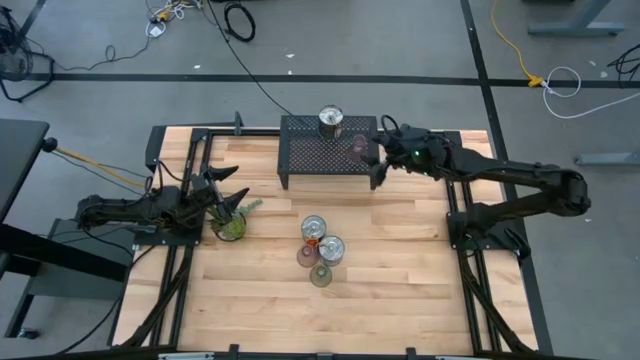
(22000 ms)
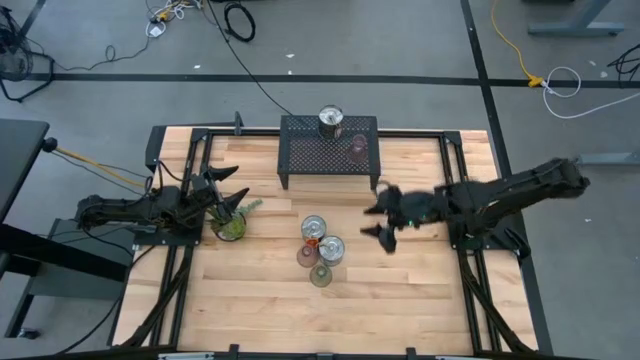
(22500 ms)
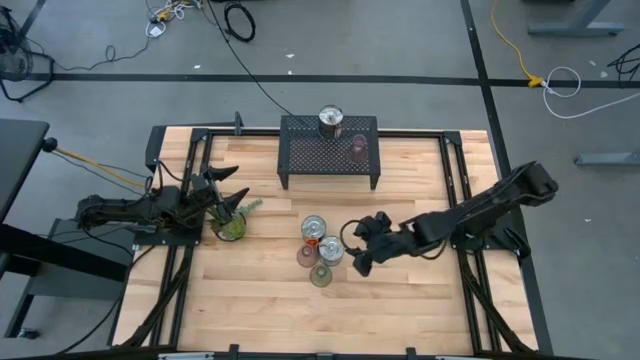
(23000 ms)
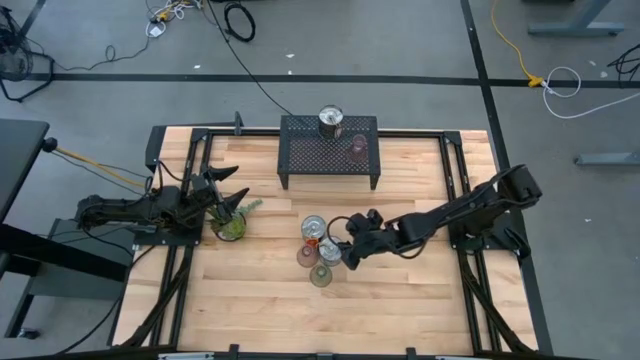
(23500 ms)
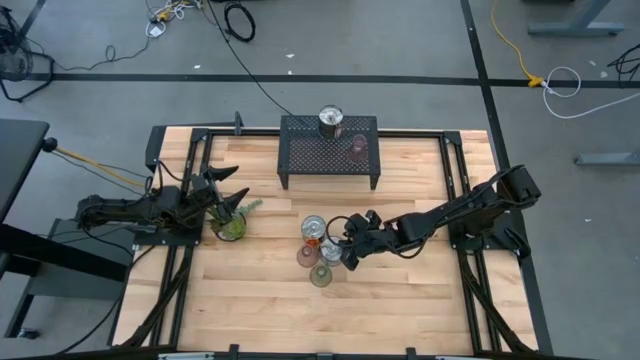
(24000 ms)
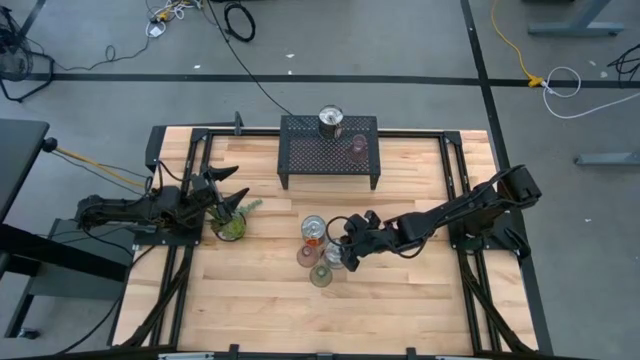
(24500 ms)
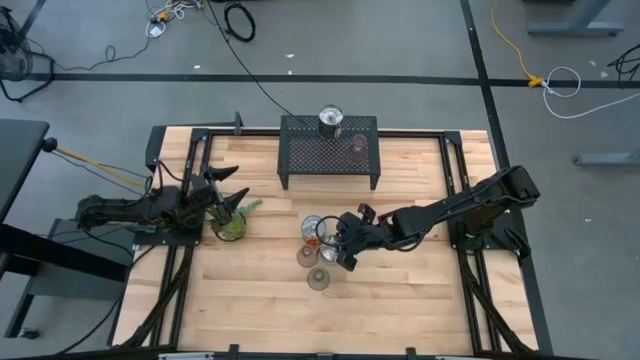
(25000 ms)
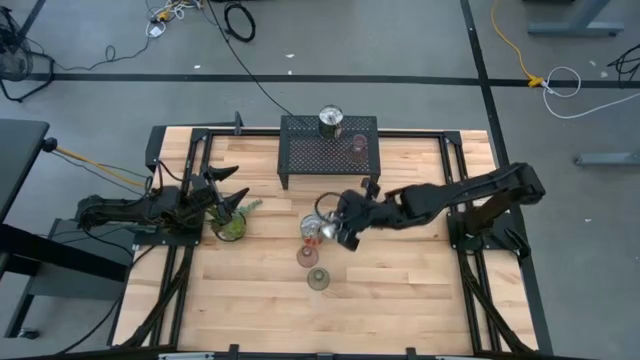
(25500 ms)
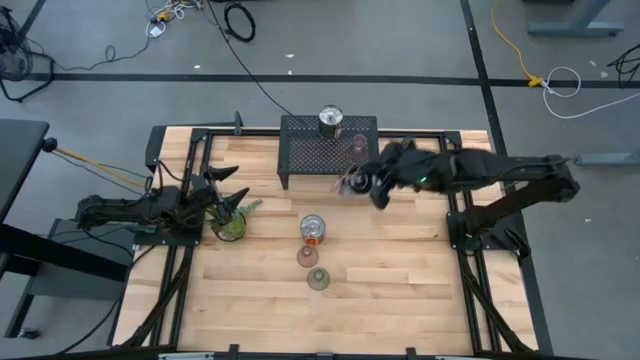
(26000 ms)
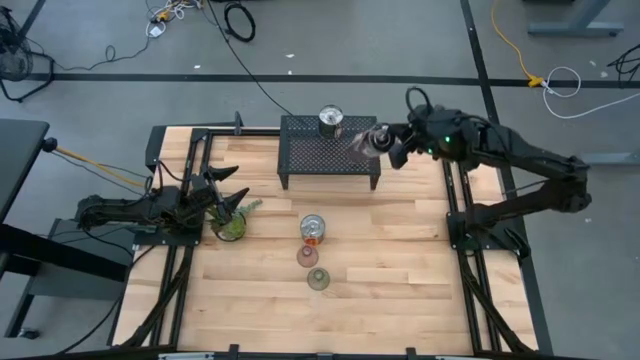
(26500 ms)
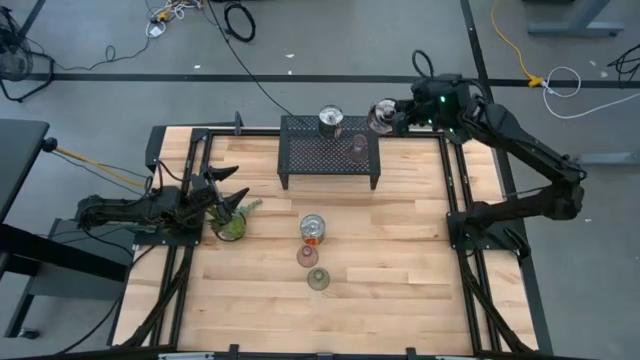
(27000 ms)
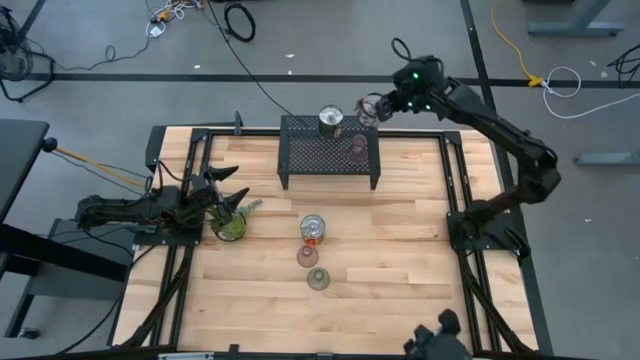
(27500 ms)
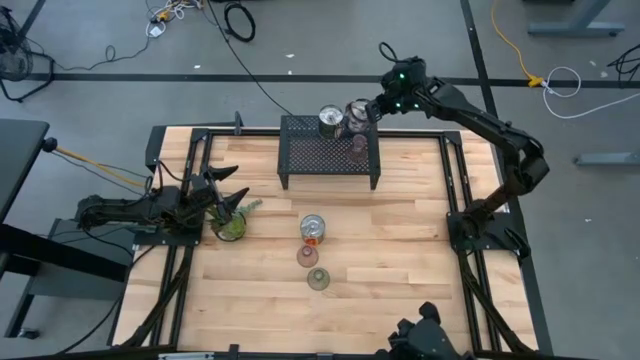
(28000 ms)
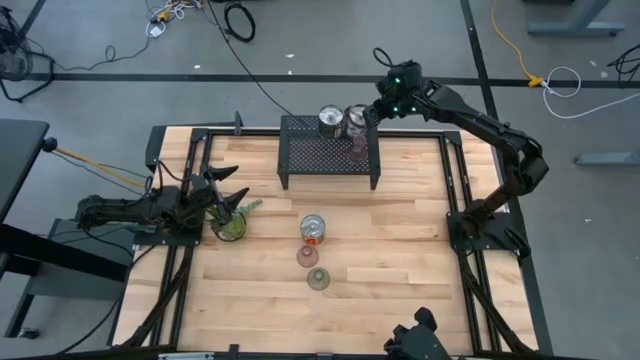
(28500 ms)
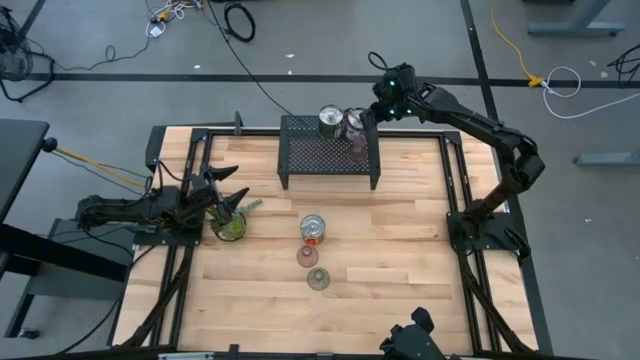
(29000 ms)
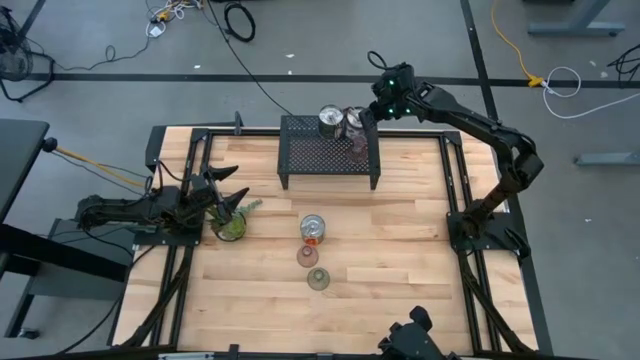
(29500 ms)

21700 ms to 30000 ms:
Task: Pick & Place candle stick holders
Put the bottom silver scented candle on the shelf

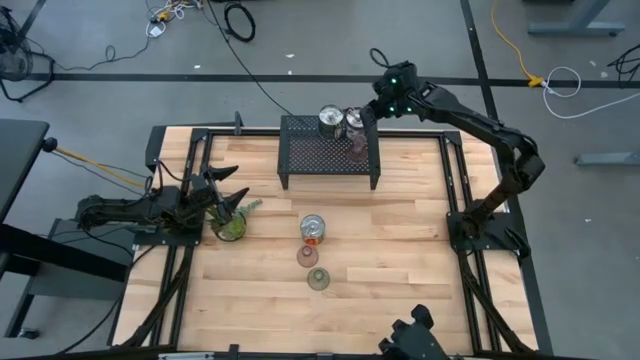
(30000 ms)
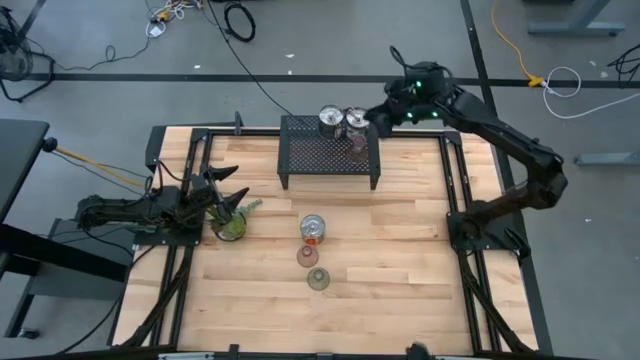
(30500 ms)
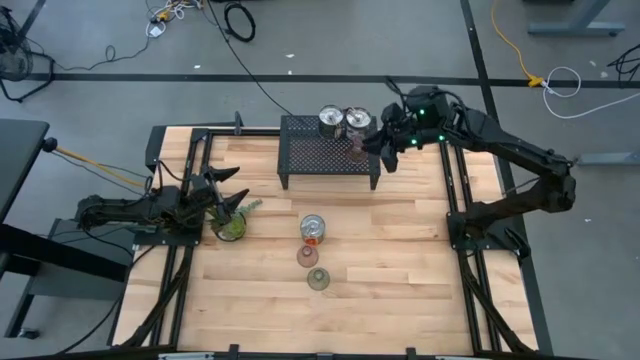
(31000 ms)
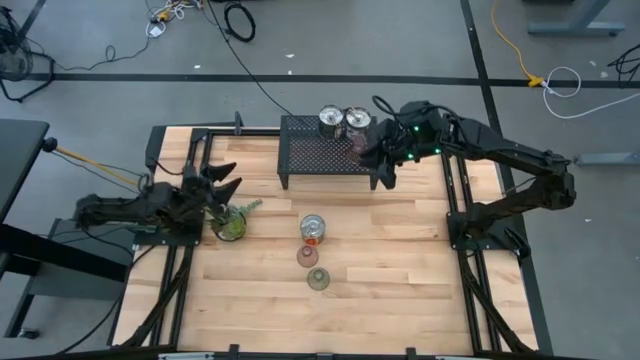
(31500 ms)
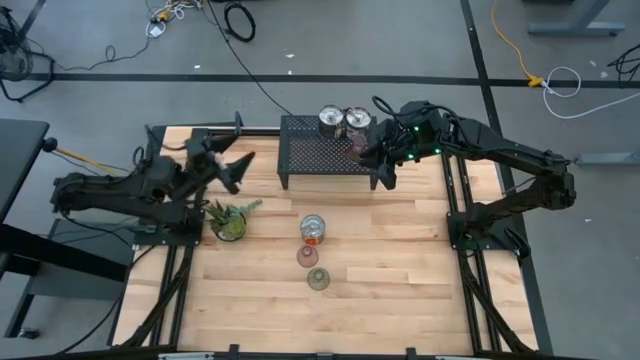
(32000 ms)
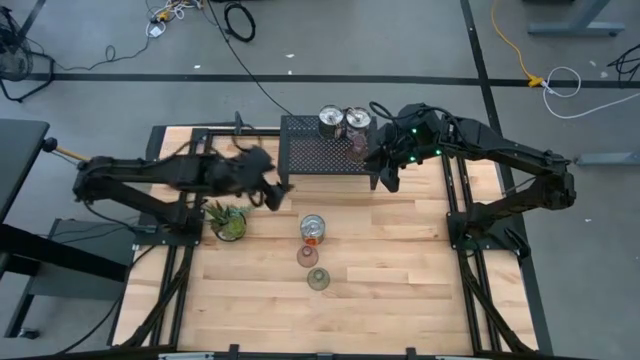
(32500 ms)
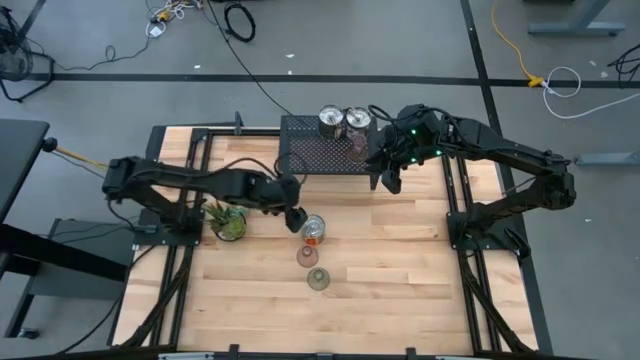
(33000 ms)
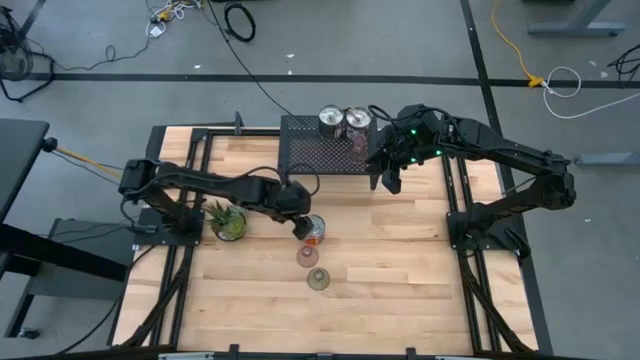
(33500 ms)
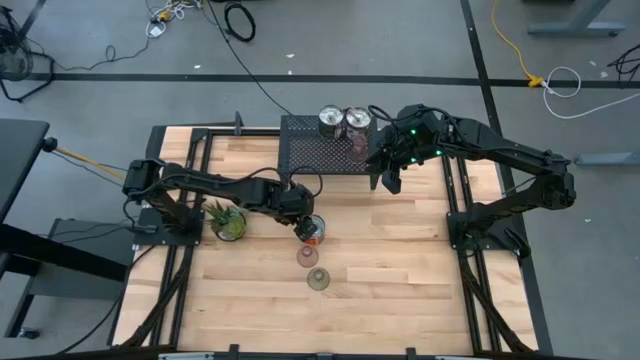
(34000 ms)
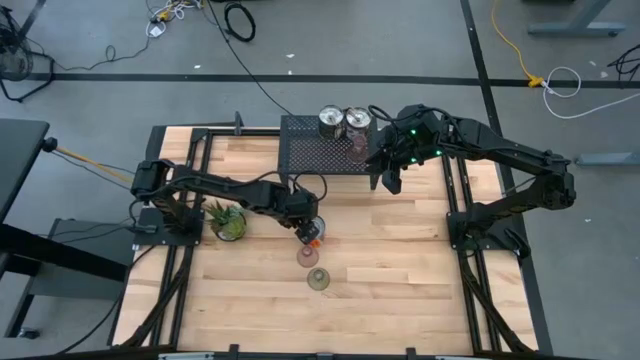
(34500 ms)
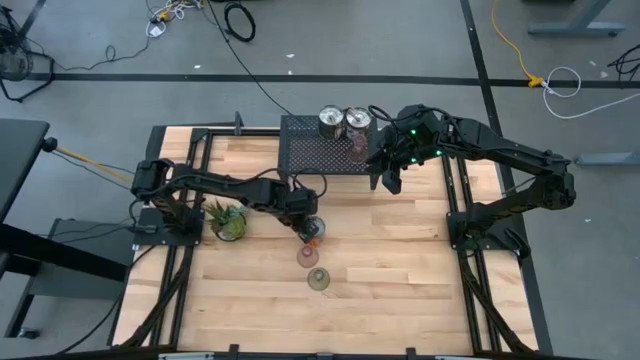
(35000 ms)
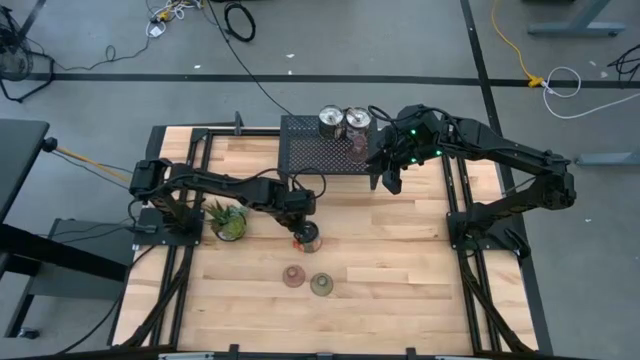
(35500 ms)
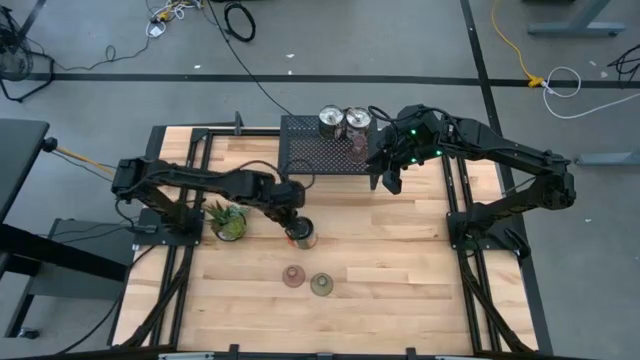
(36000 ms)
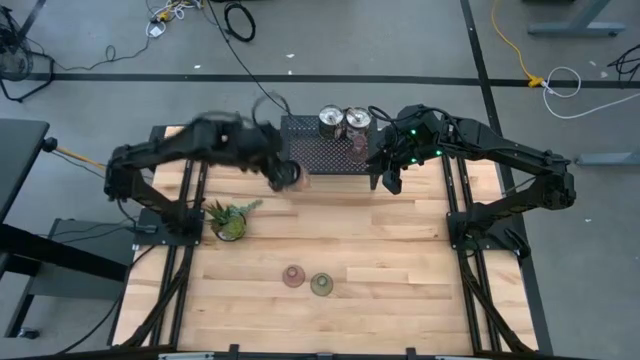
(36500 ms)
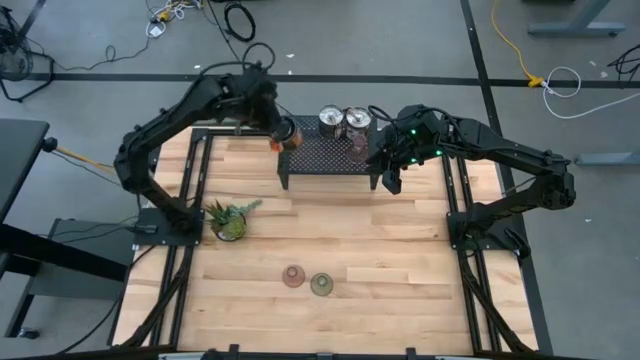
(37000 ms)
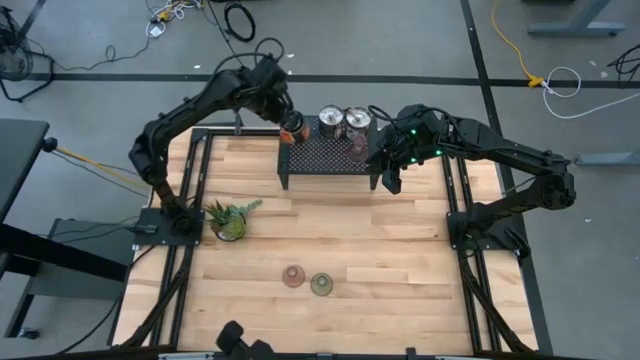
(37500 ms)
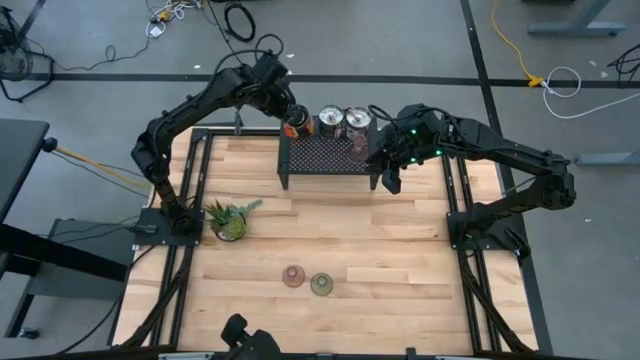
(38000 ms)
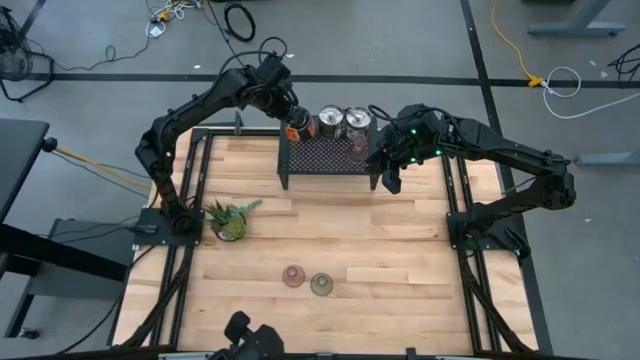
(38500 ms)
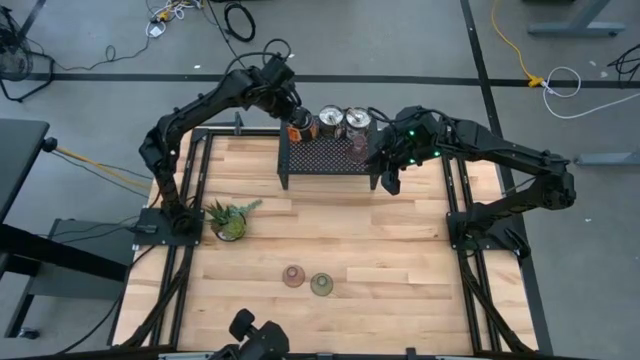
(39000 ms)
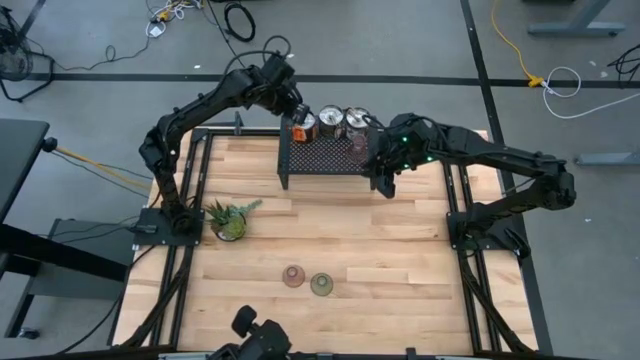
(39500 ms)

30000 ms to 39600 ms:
Put the silver scented candle on the shelf

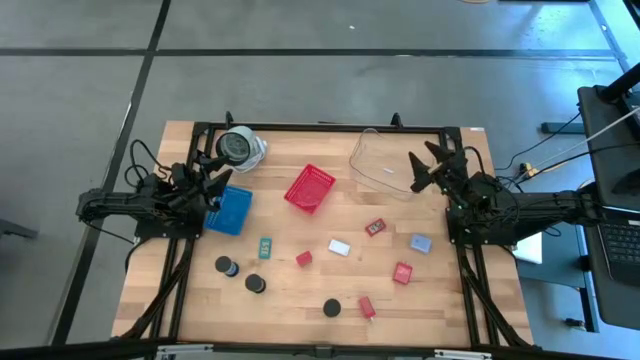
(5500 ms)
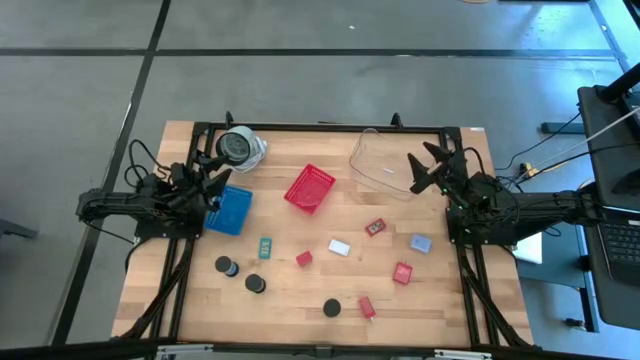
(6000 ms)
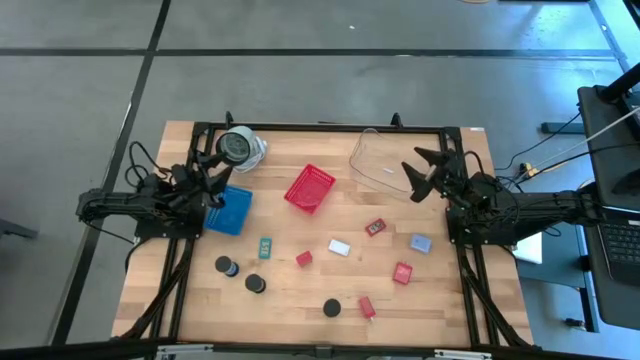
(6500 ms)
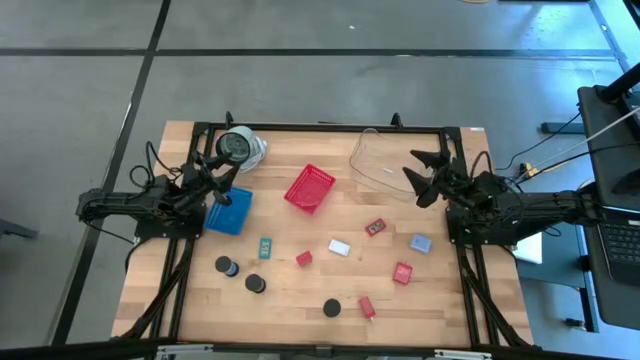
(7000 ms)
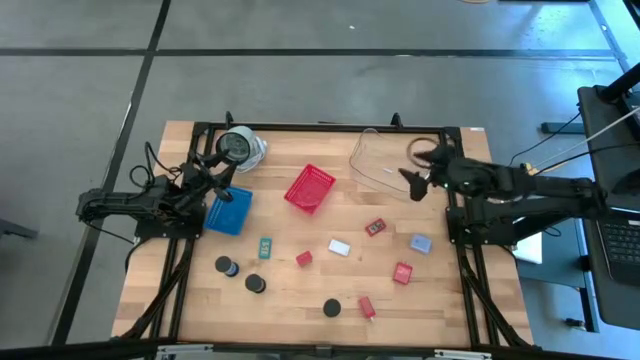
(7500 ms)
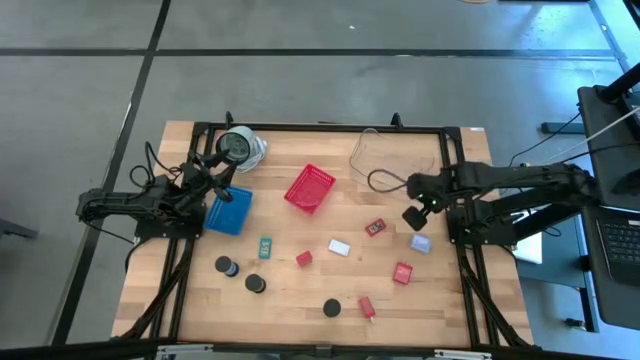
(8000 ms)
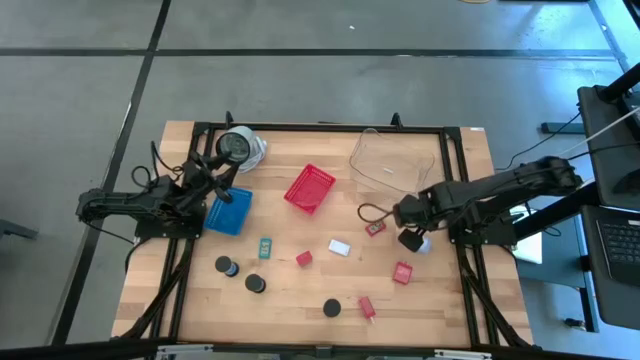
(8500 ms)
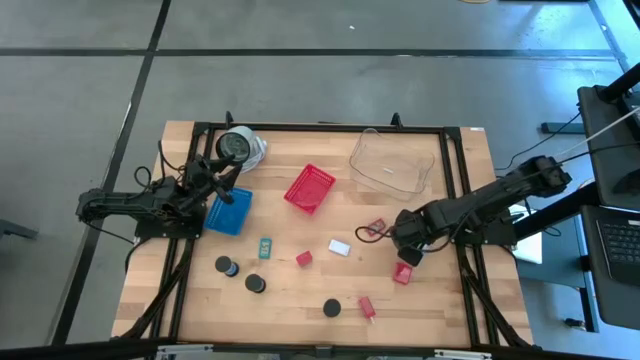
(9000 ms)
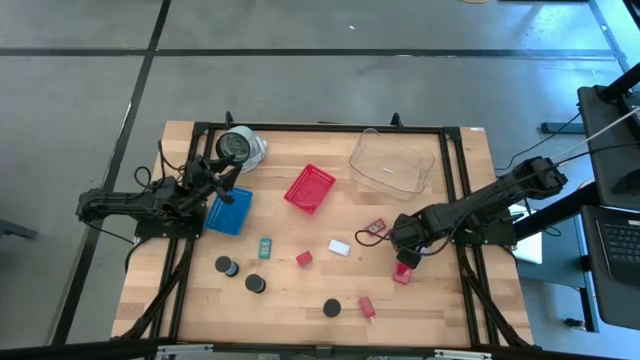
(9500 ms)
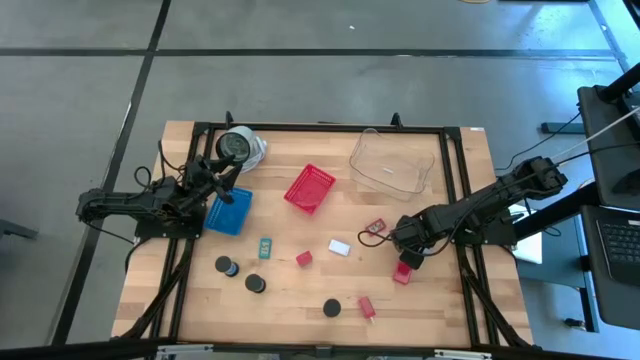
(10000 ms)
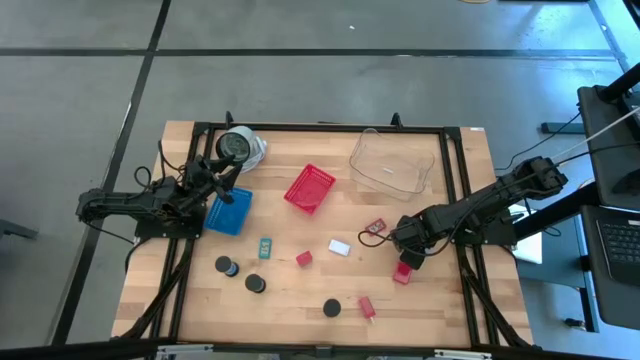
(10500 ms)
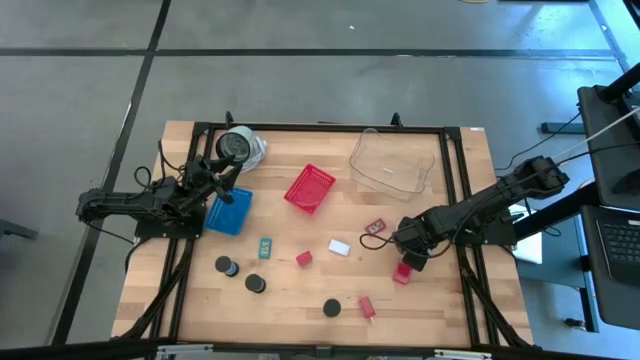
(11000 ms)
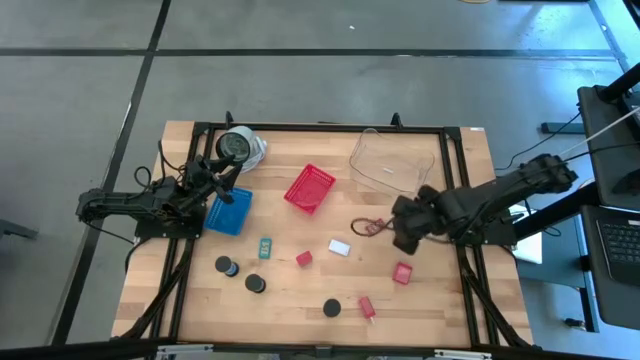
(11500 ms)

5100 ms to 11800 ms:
Task: Pick & Place Office items
Put the light blue charger adapter into the white bin
